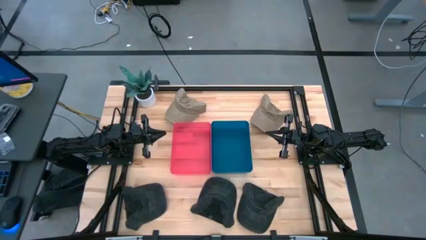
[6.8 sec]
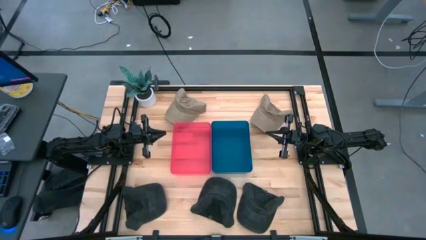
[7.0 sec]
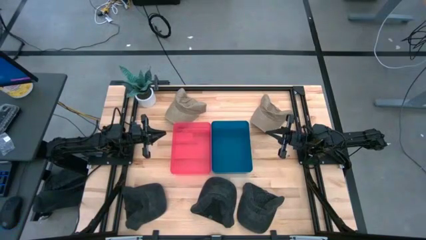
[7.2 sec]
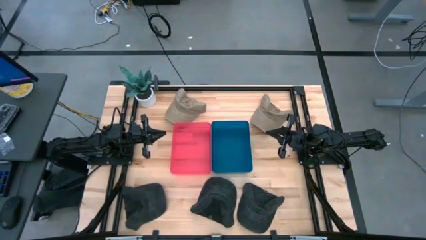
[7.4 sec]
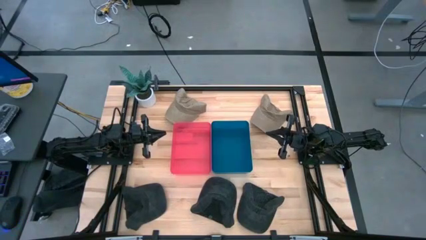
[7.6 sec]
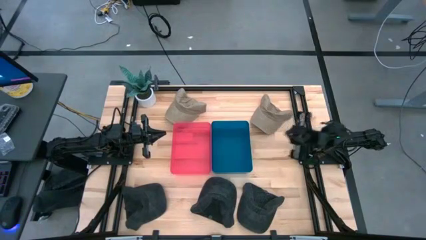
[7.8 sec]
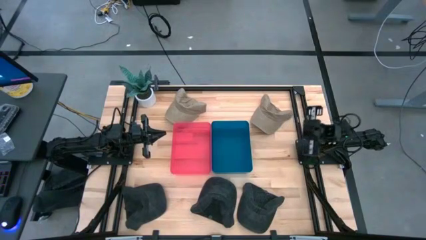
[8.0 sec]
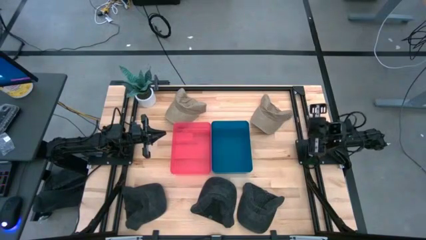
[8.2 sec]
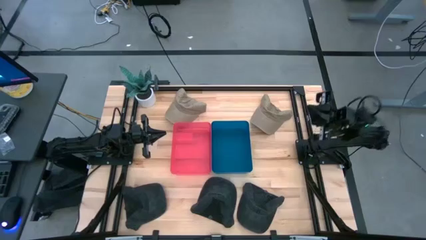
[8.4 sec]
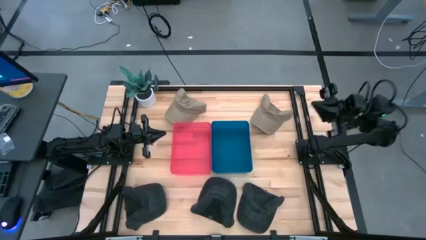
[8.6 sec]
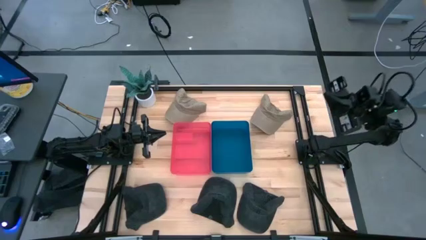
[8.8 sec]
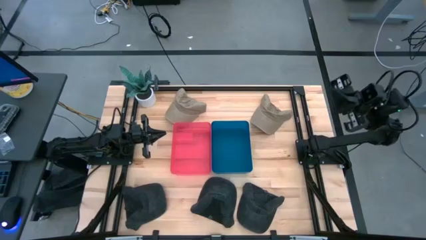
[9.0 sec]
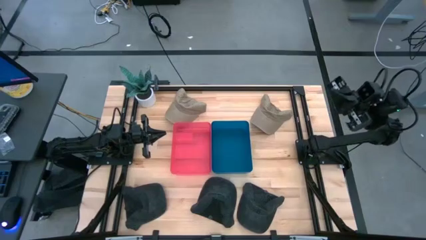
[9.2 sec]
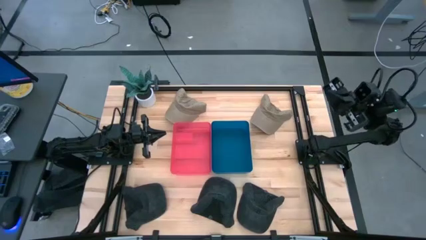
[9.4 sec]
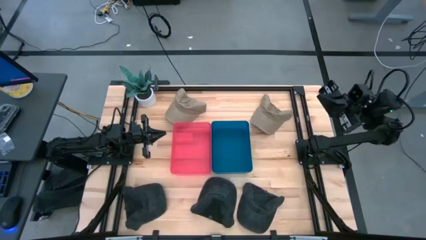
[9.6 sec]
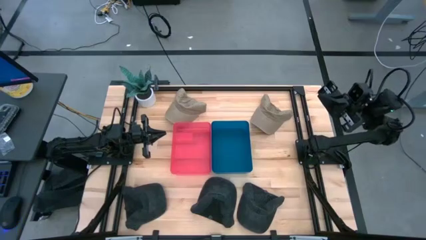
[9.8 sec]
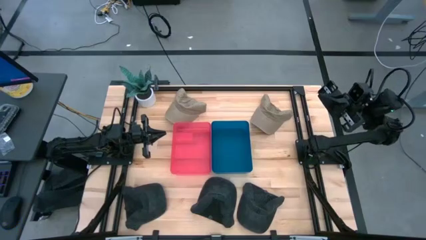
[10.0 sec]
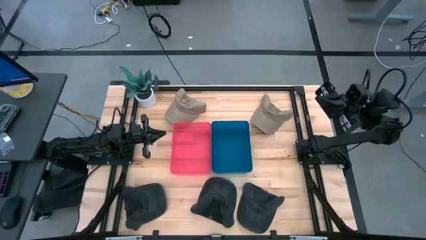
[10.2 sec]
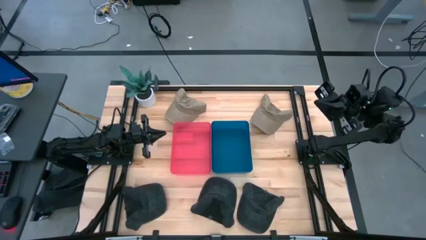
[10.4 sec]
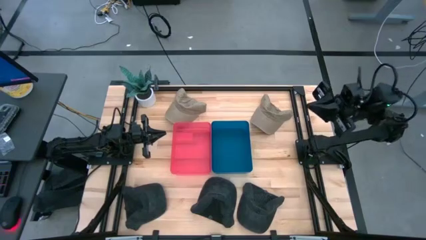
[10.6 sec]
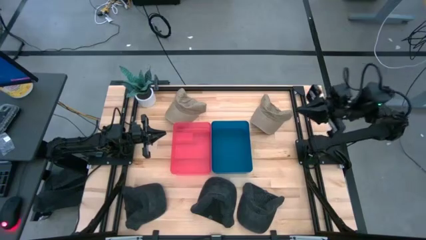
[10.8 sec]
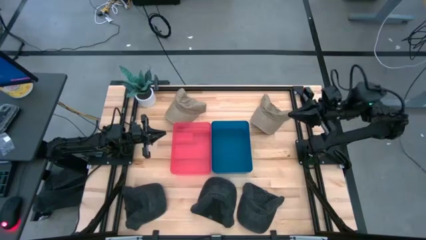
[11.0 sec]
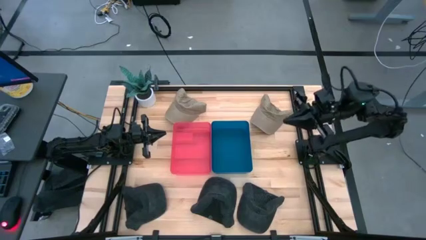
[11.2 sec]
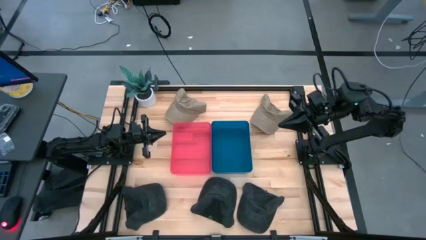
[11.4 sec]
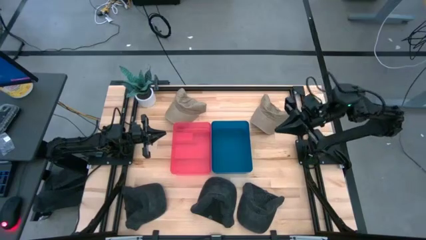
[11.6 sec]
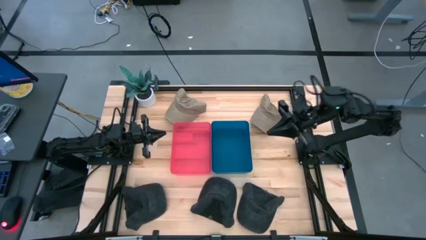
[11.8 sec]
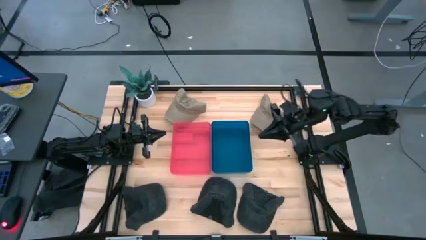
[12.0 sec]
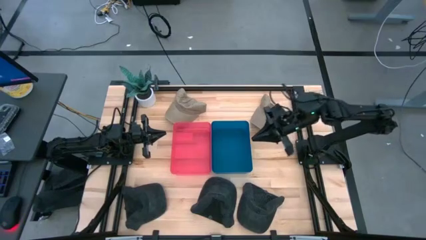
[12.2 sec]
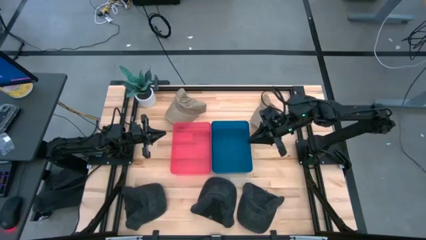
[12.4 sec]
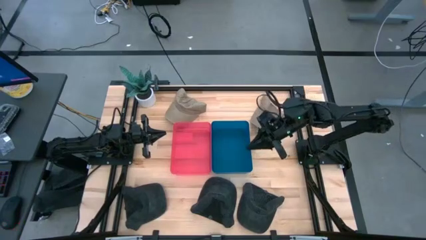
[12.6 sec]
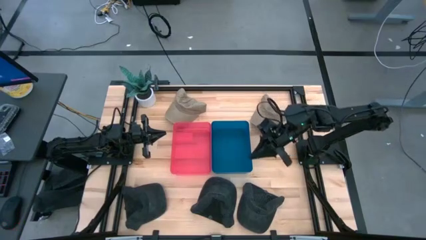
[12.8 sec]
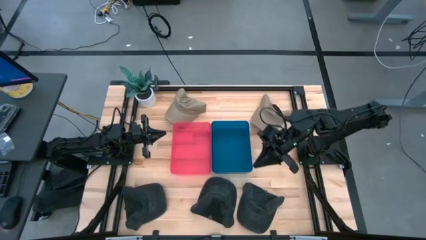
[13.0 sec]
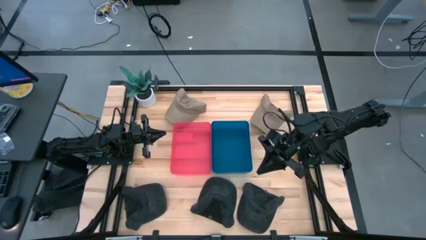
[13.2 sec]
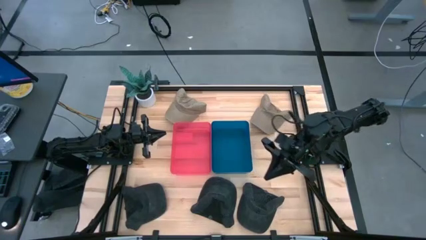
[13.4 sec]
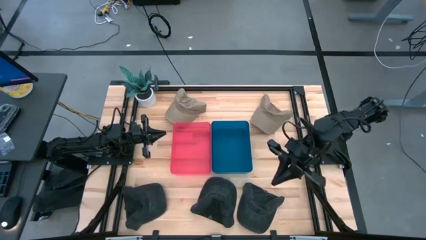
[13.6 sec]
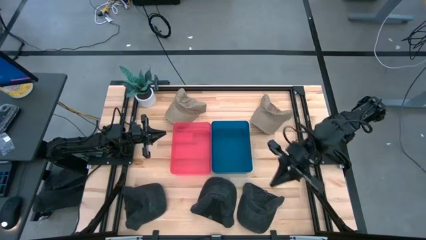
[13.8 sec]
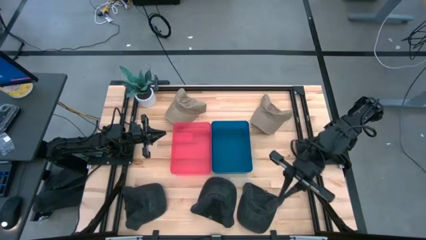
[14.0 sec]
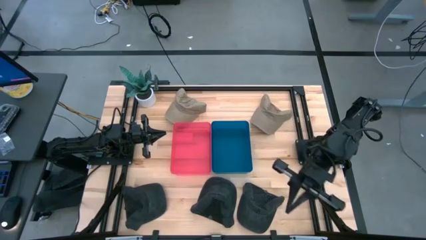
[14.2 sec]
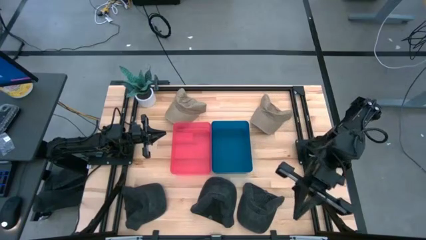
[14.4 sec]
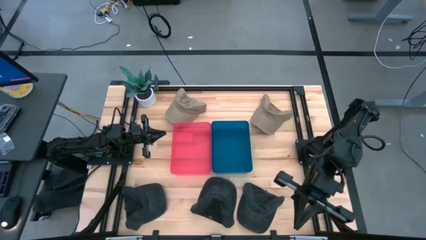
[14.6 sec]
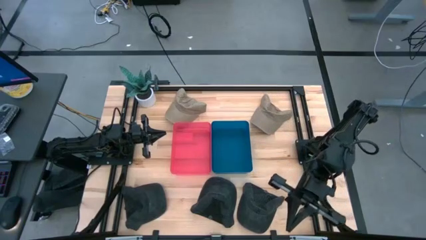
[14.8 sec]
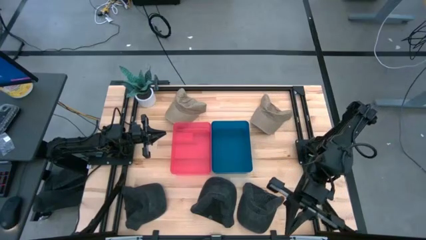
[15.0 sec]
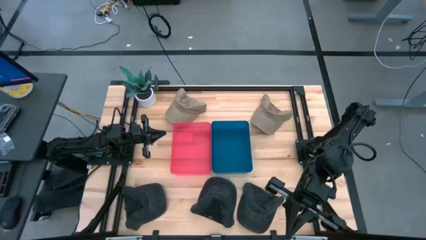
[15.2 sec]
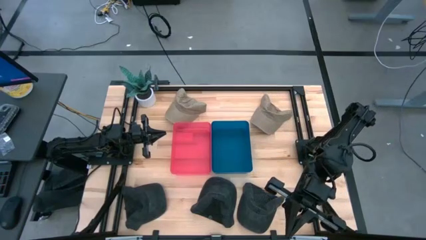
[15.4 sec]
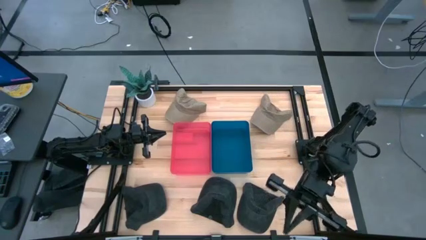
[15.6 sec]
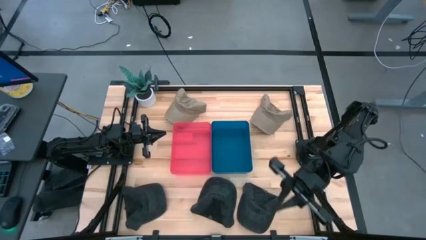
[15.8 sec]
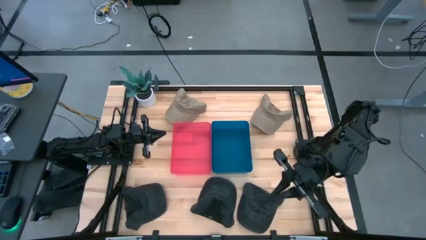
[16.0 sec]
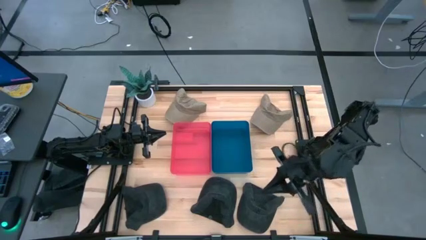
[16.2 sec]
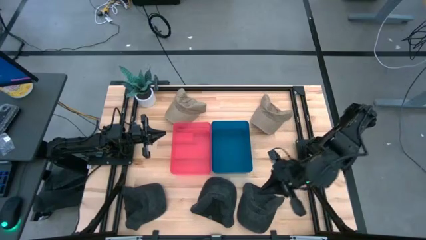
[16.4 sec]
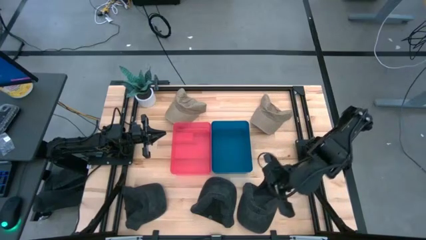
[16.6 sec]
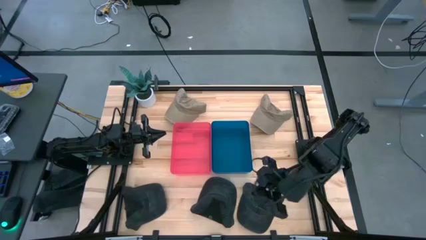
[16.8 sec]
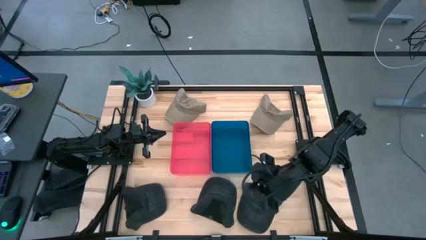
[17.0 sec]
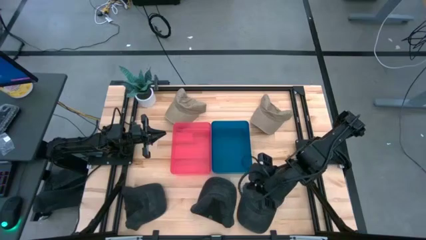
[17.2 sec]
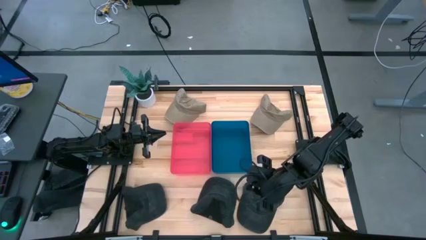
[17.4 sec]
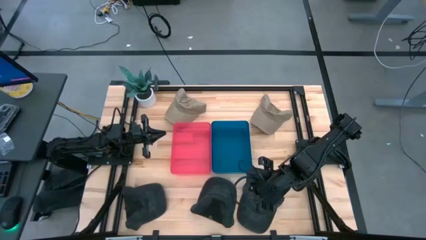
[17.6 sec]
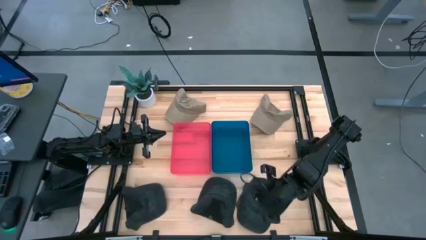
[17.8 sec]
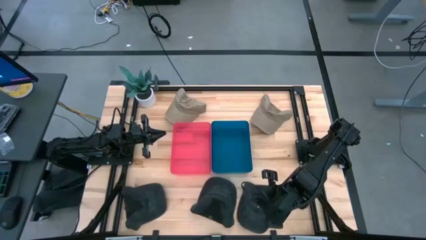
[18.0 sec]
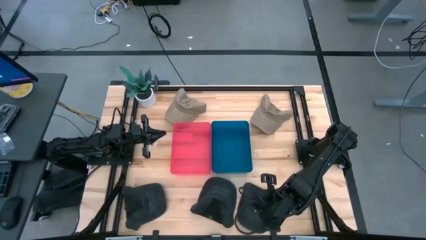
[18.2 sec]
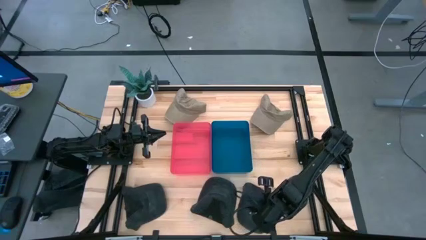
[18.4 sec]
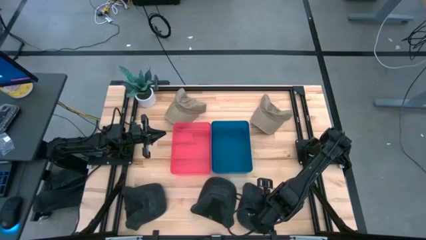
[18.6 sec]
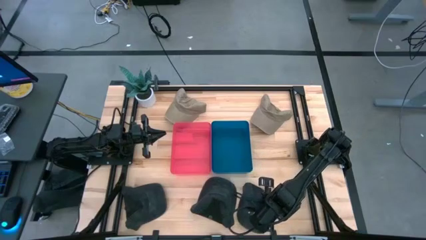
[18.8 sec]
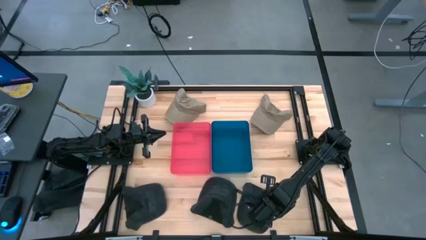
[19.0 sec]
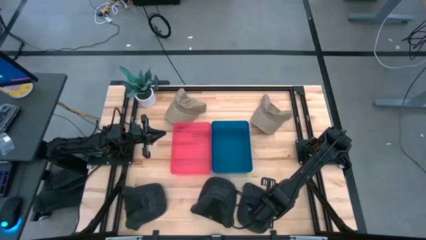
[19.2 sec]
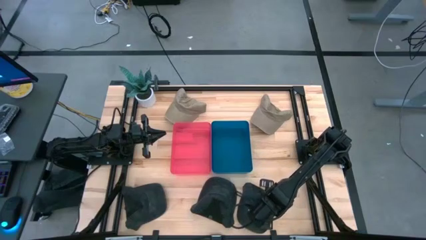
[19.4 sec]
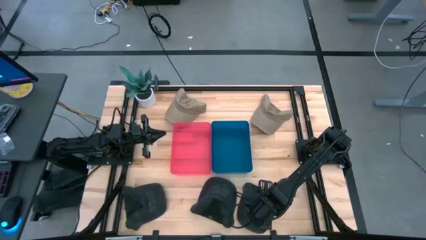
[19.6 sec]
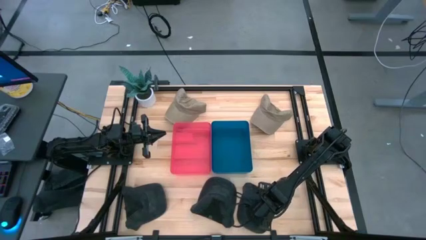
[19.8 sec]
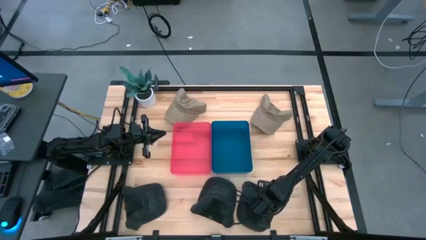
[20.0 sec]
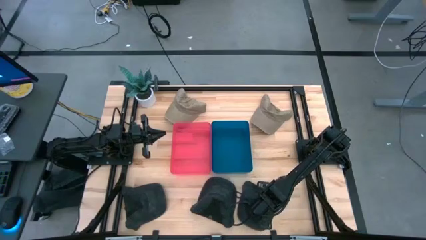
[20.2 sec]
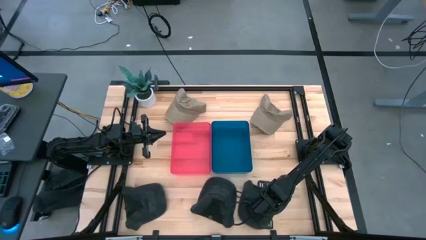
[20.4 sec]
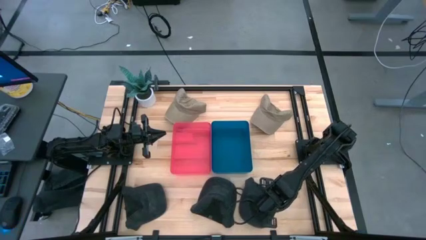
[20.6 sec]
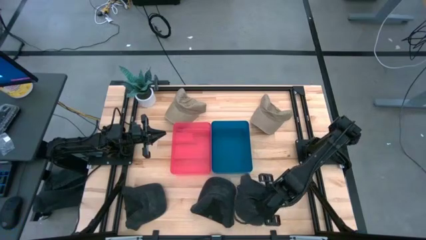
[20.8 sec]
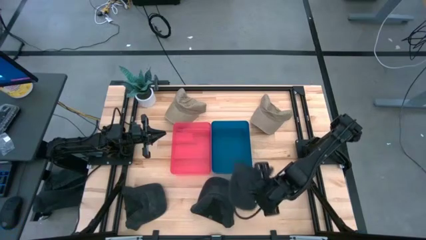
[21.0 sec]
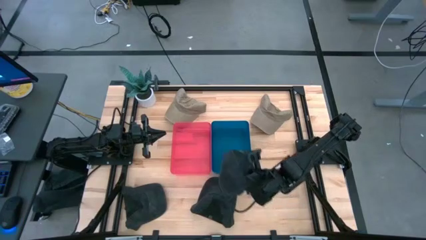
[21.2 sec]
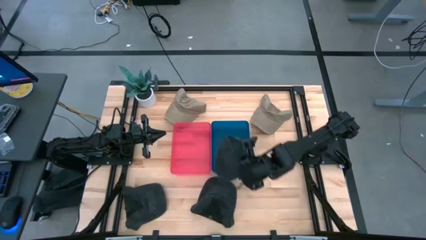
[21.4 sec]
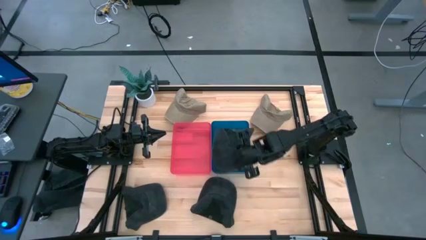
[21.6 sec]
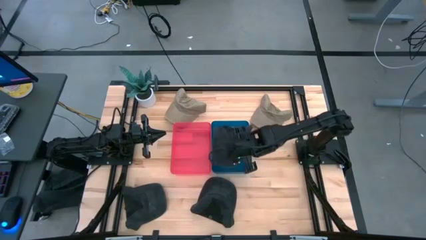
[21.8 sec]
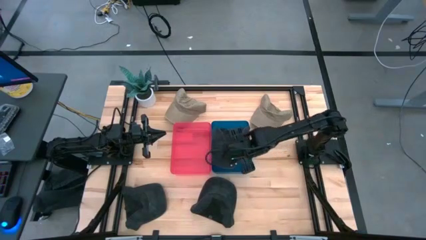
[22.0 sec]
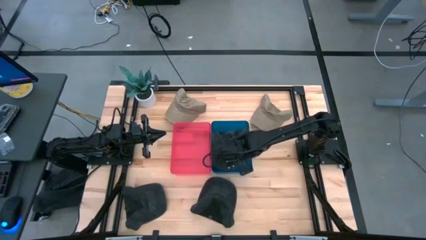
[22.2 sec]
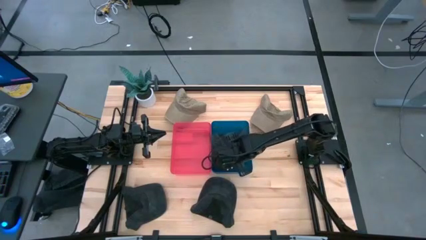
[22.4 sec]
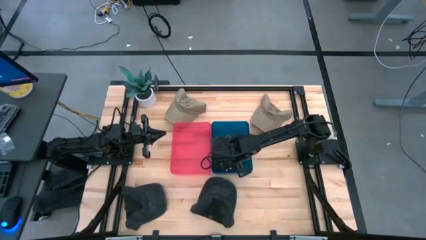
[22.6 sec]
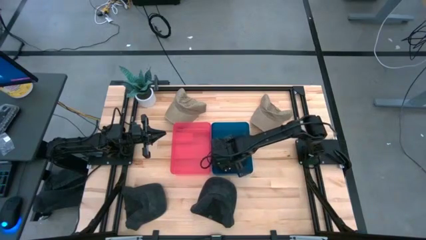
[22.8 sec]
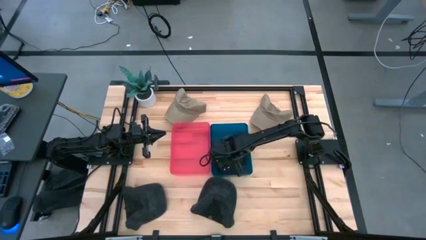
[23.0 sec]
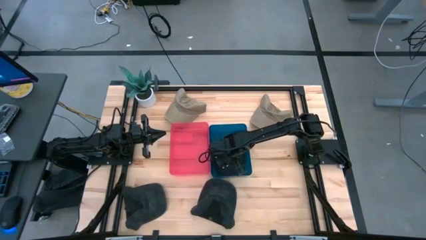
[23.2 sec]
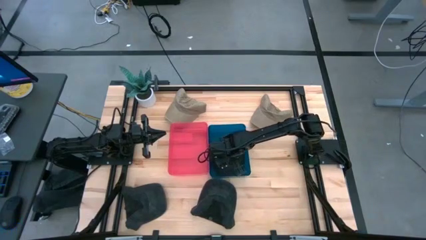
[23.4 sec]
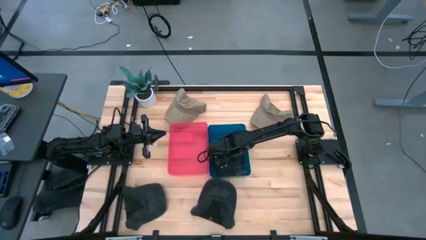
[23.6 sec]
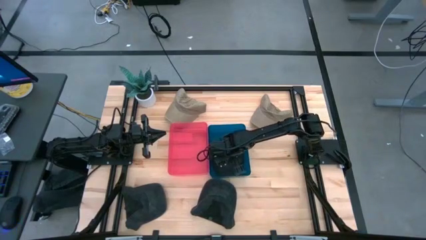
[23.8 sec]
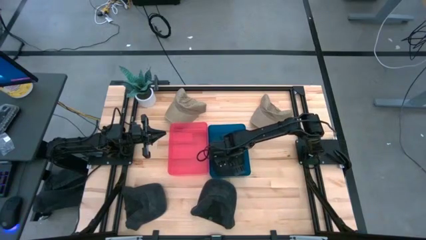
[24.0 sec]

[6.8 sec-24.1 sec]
Task: Pick & Place hat
Put the black cap into the blue bin
